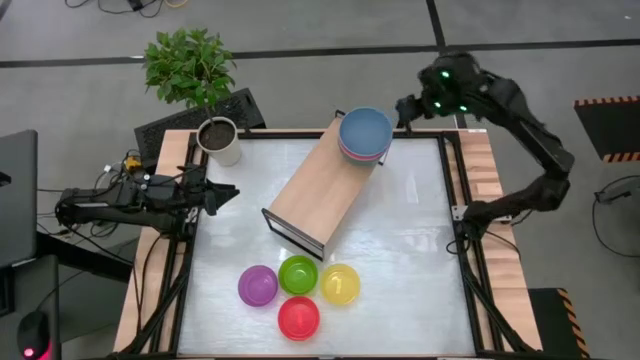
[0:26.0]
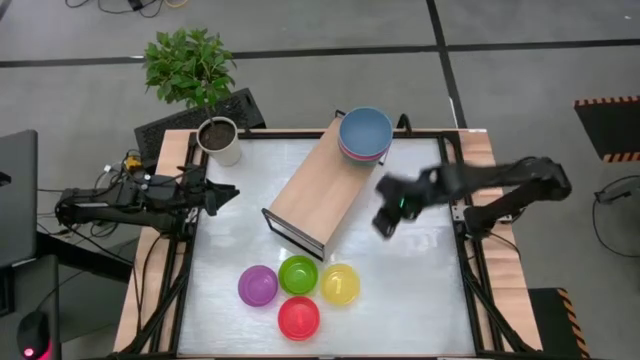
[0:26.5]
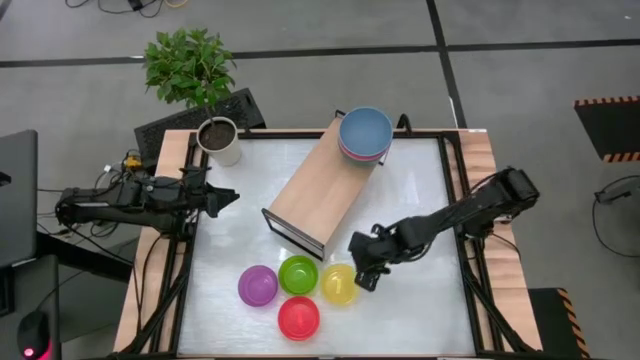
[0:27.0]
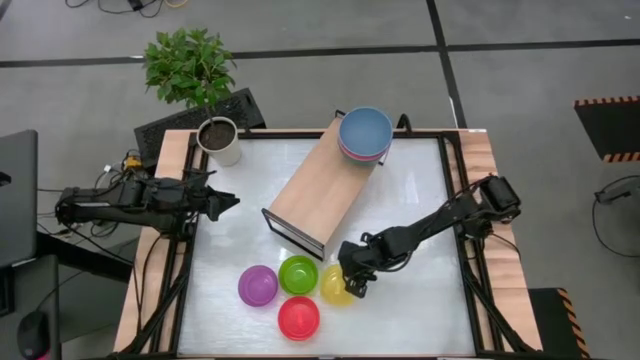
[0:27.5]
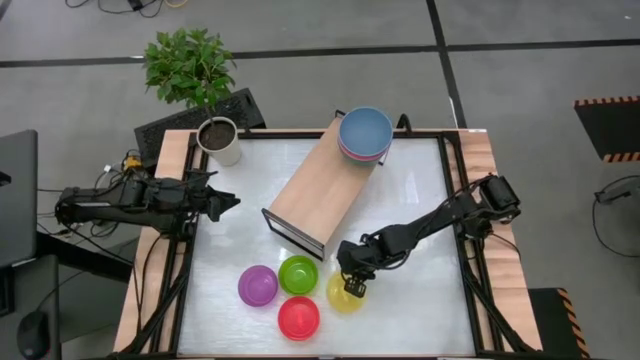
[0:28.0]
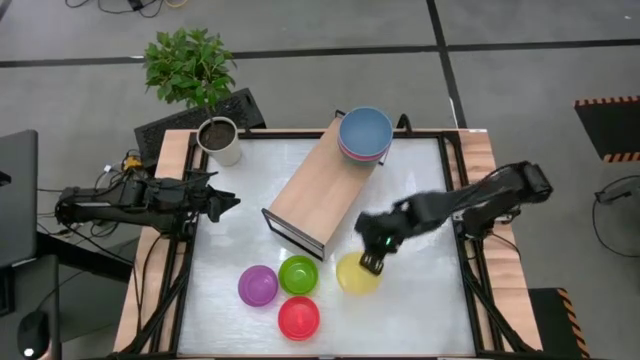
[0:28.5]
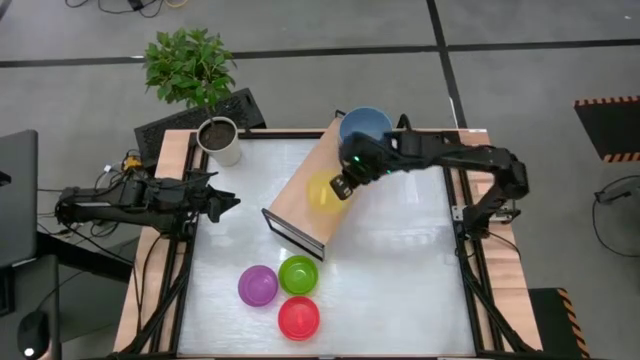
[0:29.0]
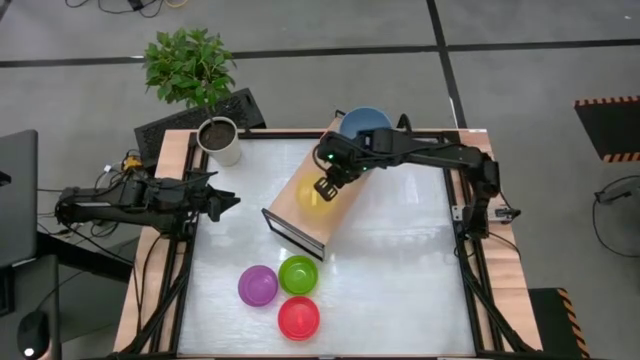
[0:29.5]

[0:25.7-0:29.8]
Task: Place and stack bowls onto a shelf
Put the yellow bowl on the shelf

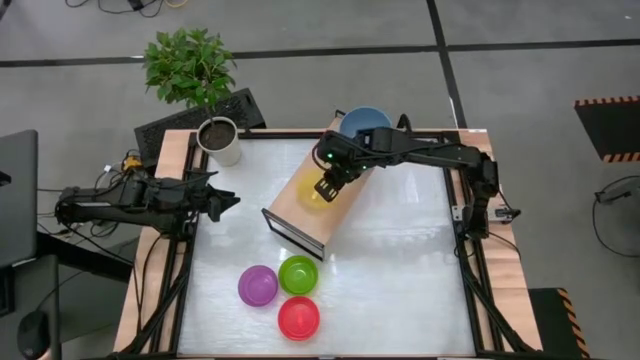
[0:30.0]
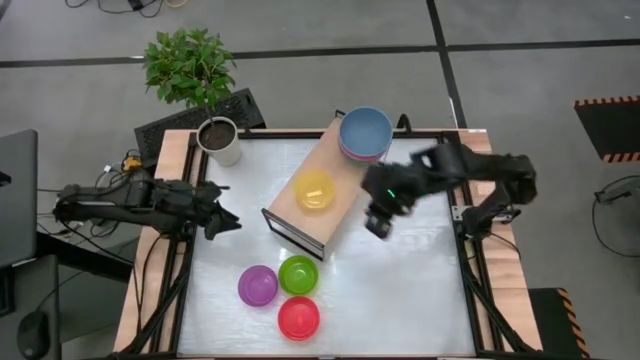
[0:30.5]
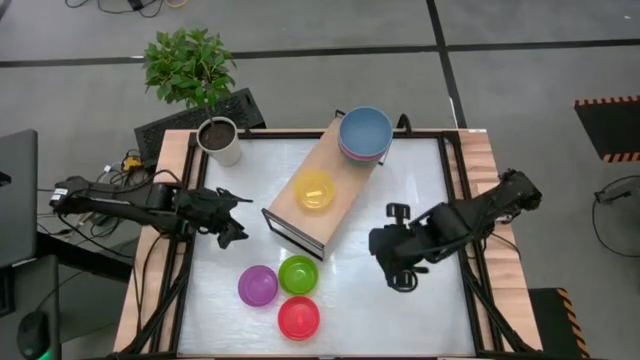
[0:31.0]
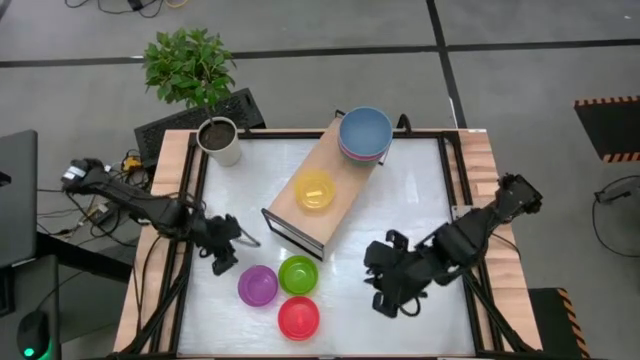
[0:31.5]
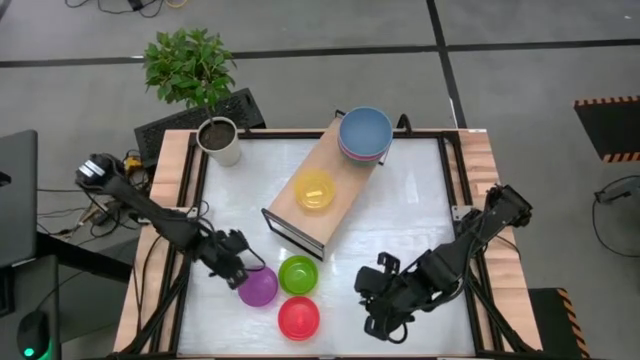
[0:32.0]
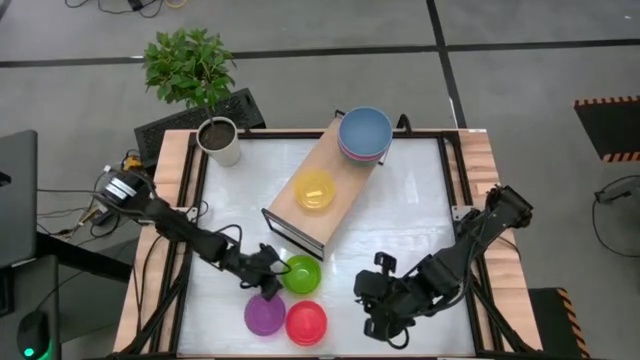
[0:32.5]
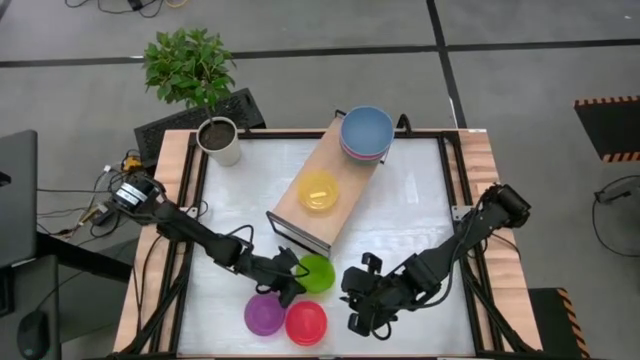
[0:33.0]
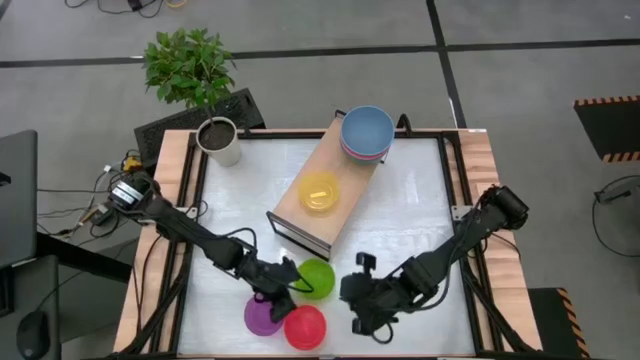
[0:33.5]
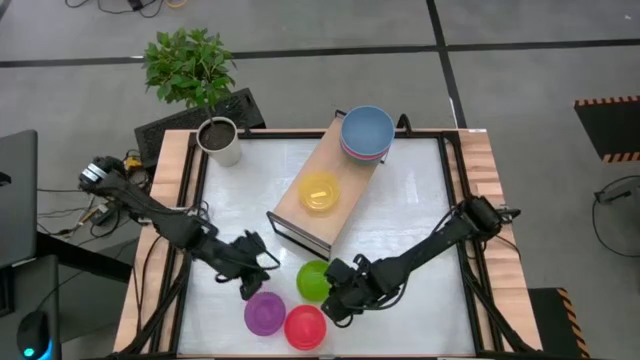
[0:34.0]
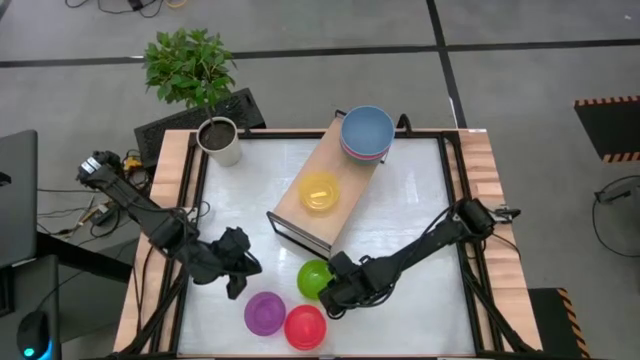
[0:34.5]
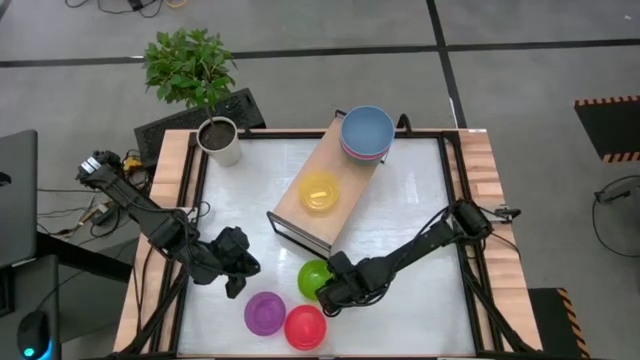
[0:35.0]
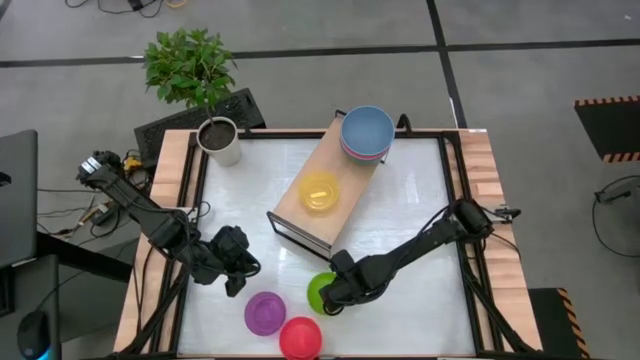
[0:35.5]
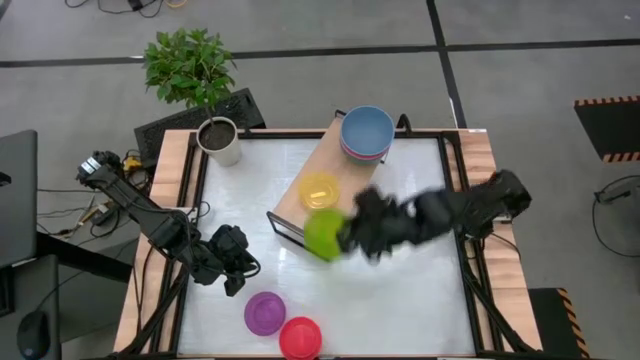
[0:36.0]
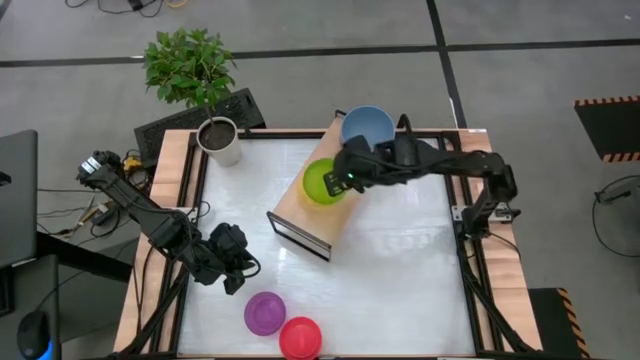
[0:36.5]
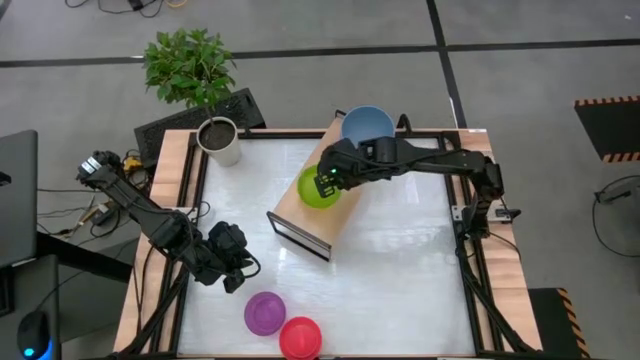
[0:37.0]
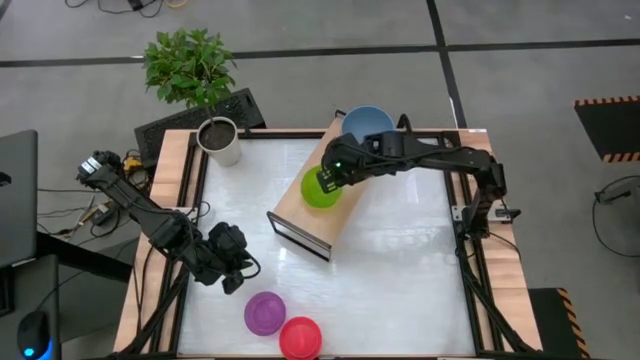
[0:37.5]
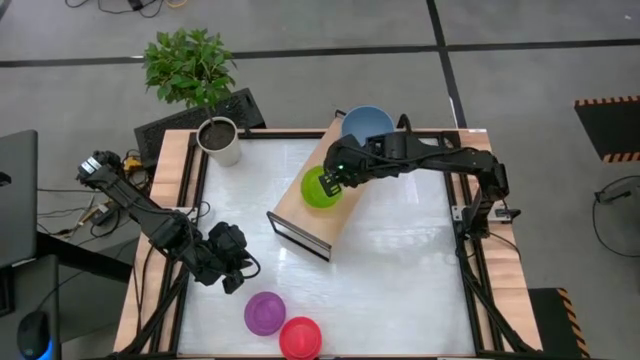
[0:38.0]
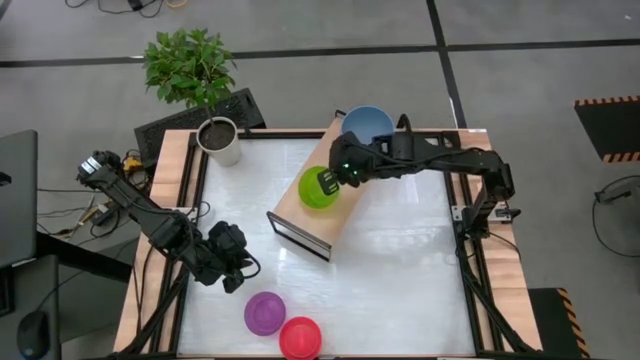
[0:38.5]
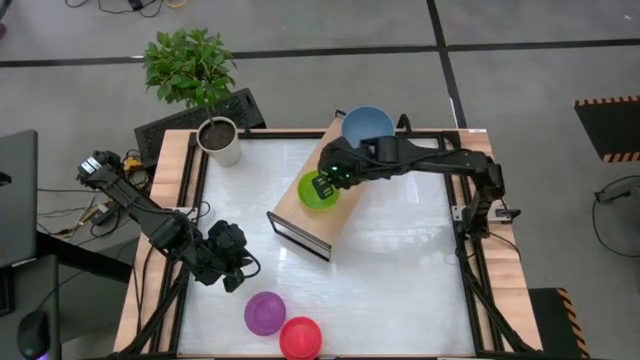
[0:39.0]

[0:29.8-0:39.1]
Stack the light green bowl on the yellow bowl

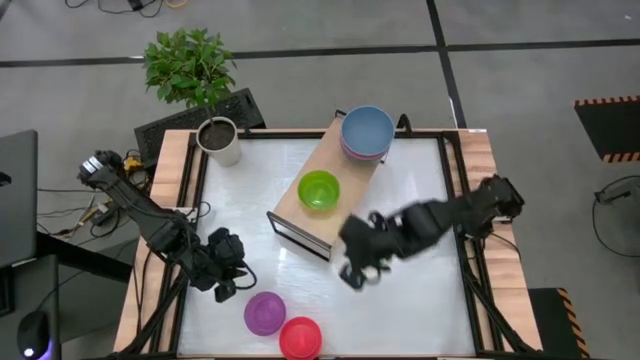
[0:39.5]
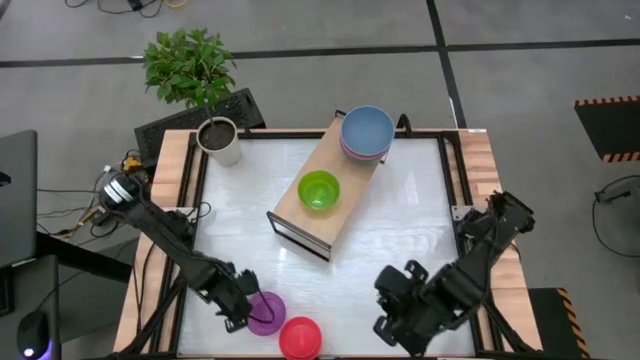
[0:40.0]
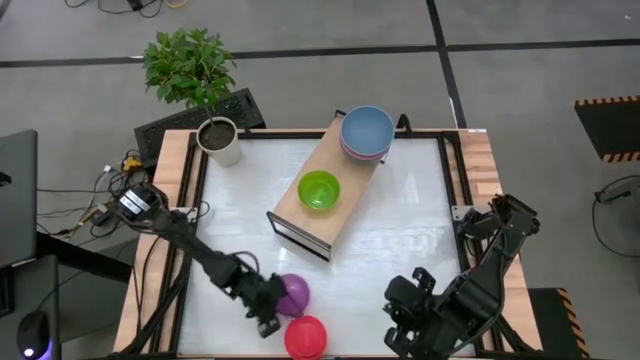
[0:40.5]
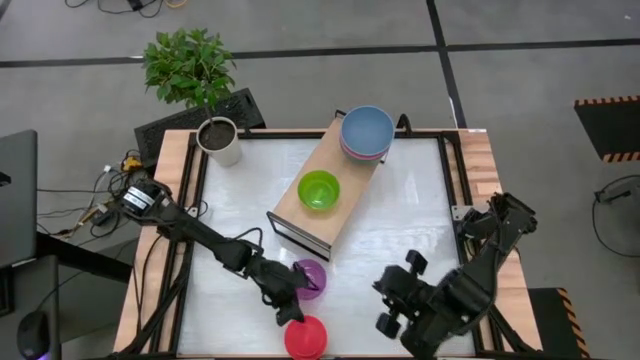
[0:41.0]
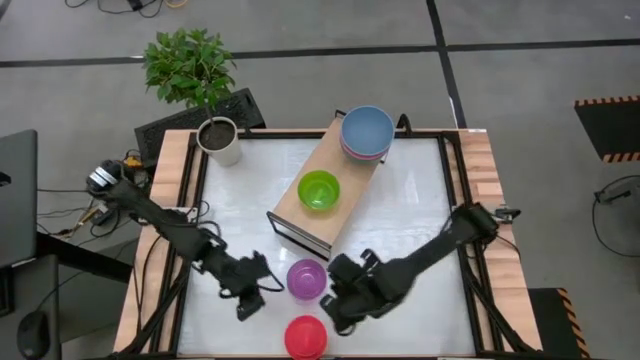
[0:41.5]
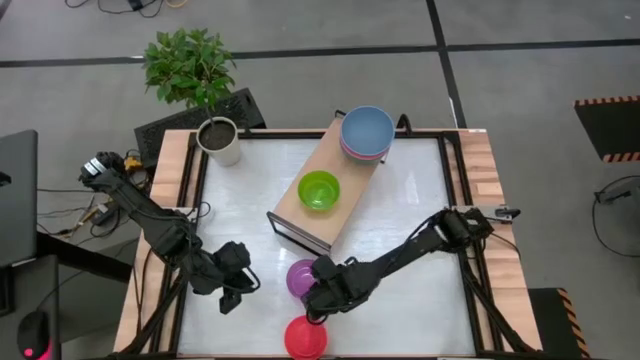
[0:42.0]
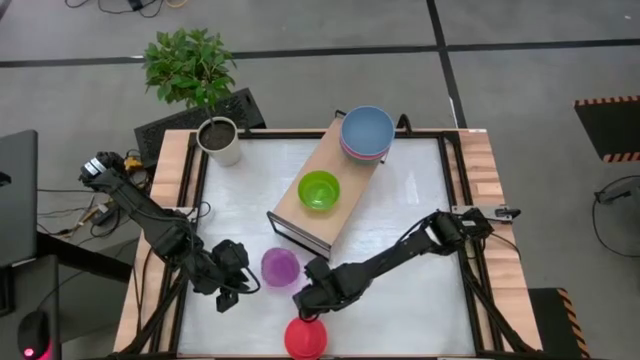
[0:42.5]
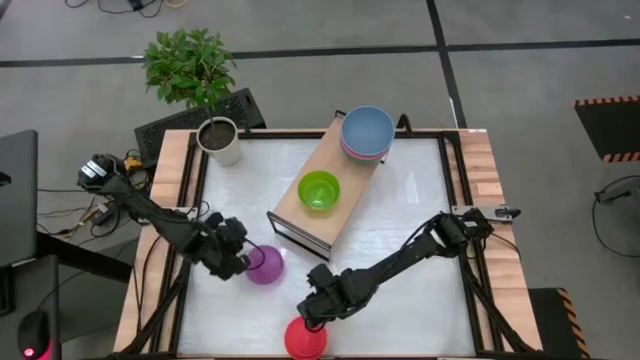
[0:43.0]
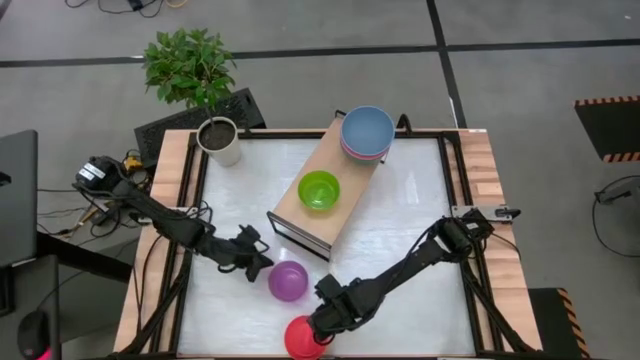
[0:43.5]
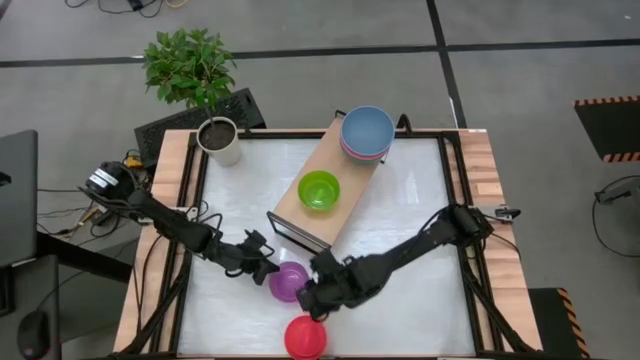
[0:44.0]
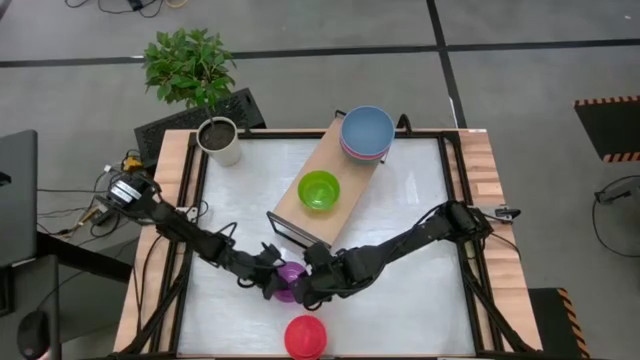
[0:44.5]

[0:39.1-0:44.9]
Stack the purple bowl on the light green bowl

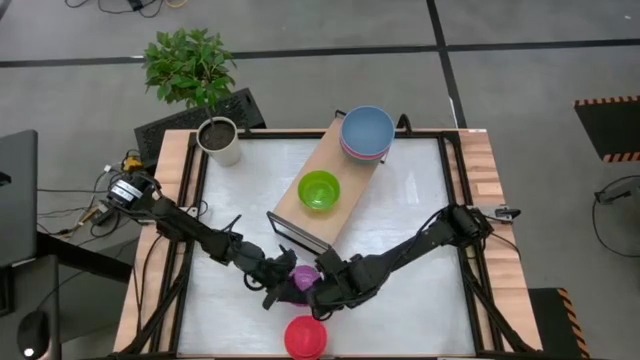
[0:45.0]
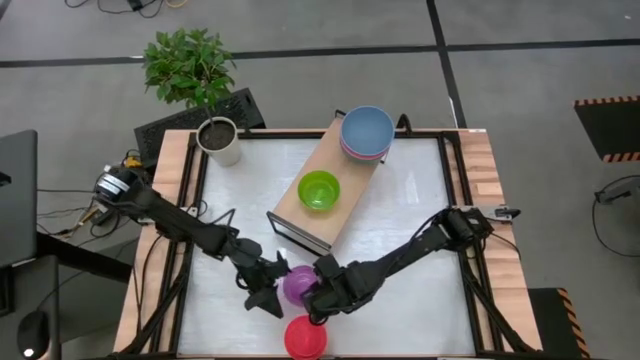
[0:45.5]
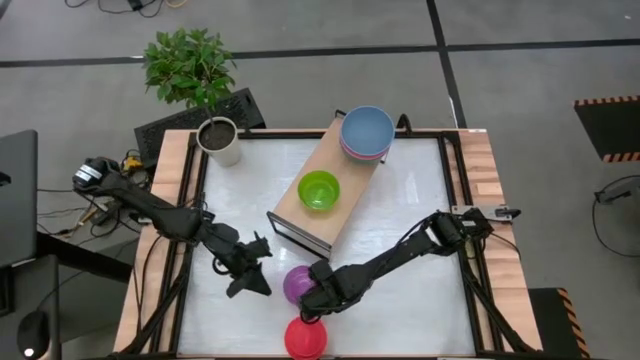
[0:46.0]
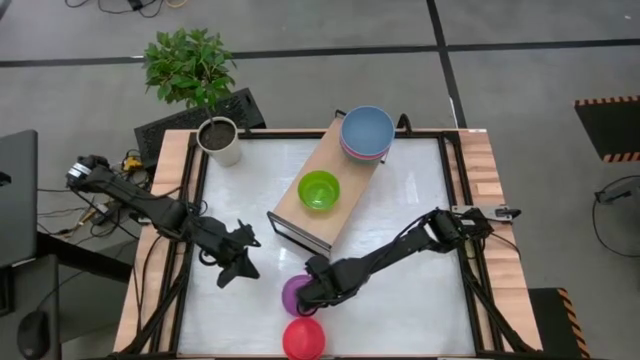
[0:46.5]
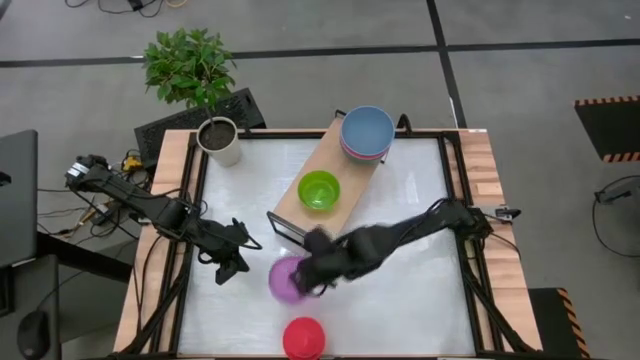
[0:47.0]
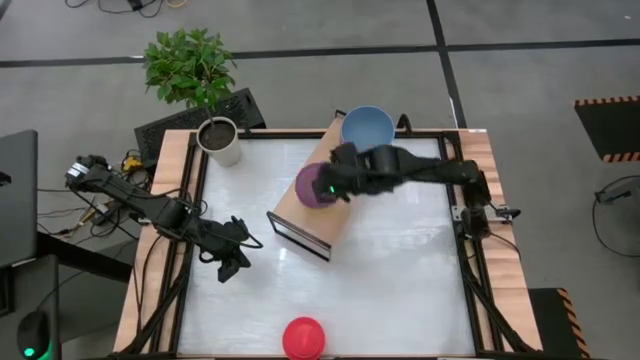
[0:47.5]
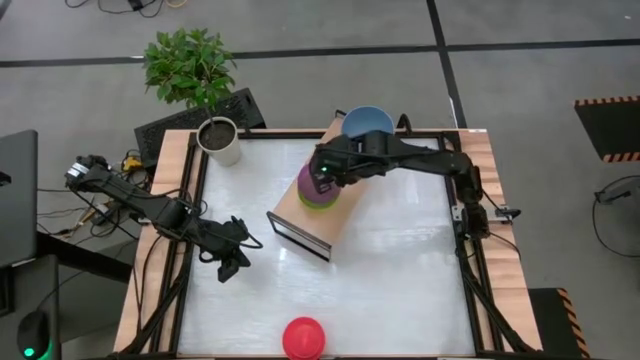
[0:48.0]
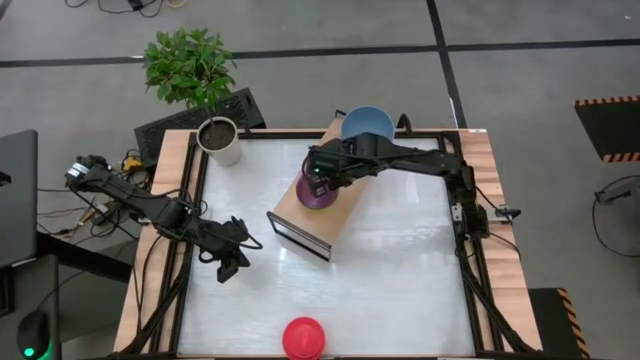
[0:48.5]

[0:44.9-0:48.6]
Stack the purple bowl on the light green bowl
